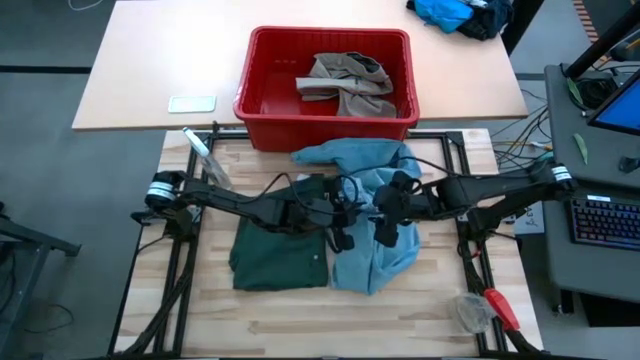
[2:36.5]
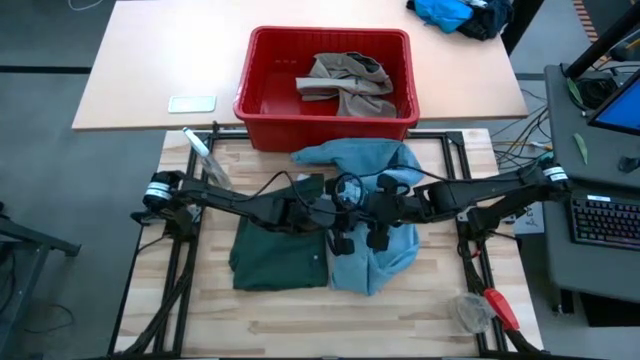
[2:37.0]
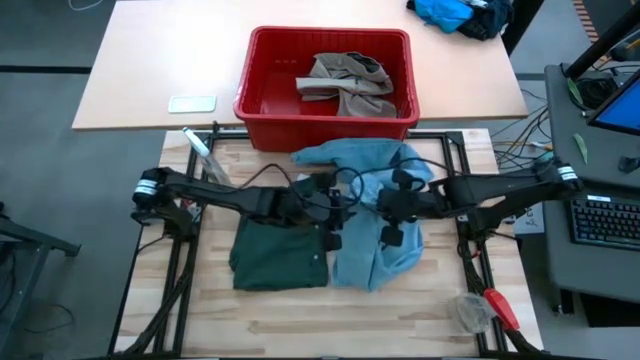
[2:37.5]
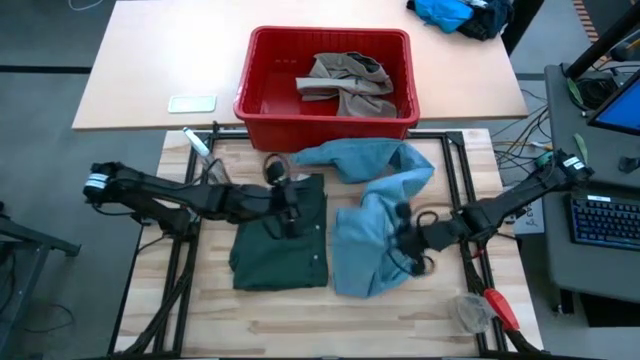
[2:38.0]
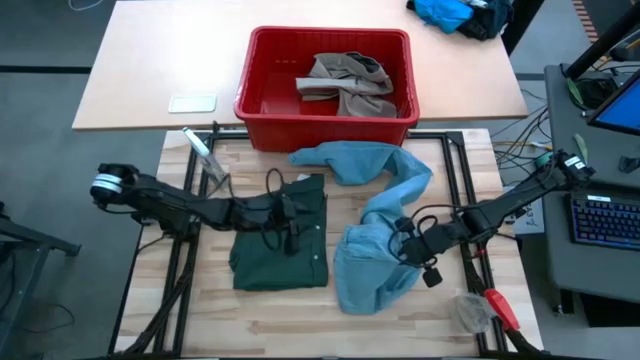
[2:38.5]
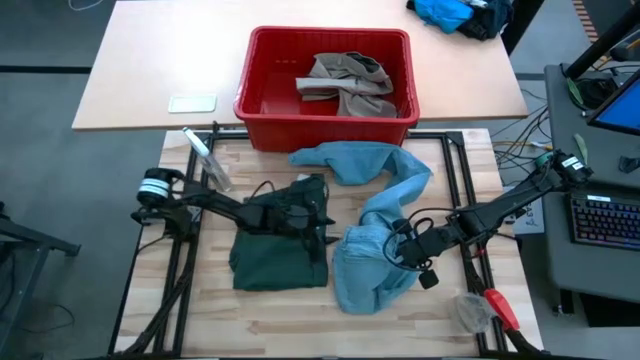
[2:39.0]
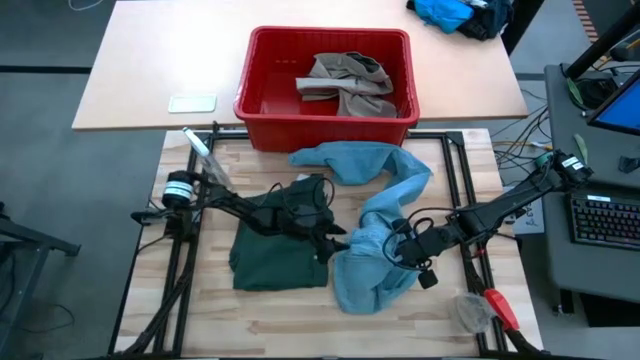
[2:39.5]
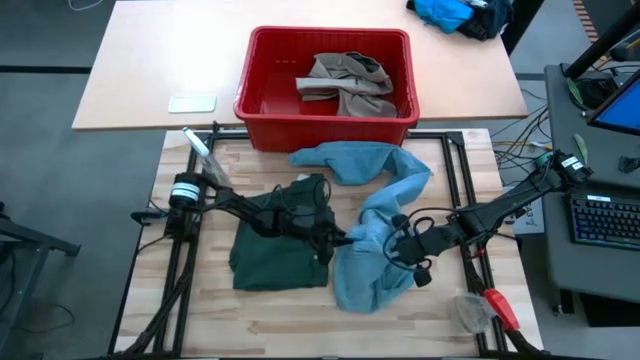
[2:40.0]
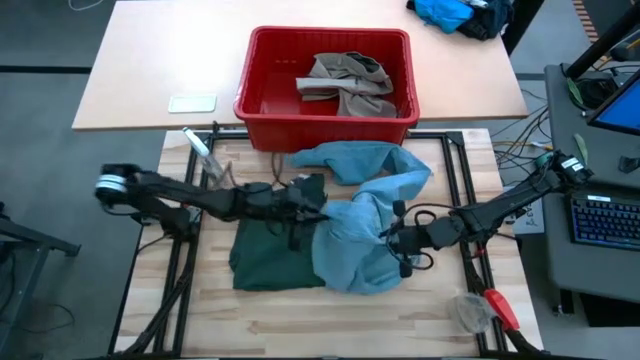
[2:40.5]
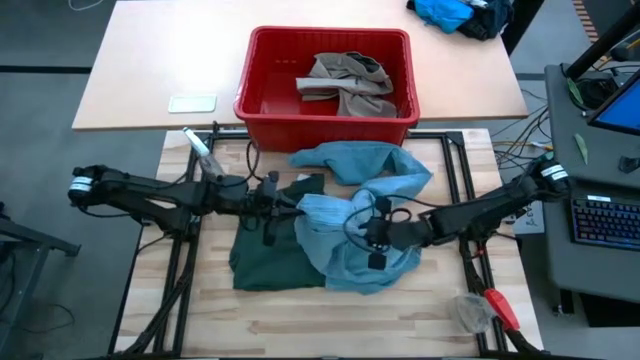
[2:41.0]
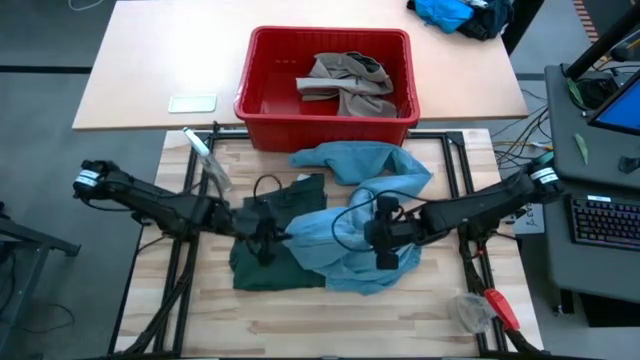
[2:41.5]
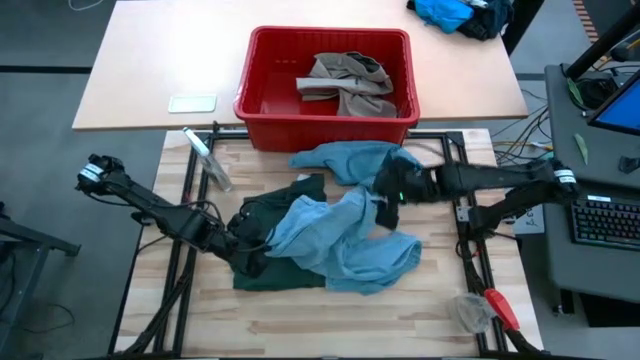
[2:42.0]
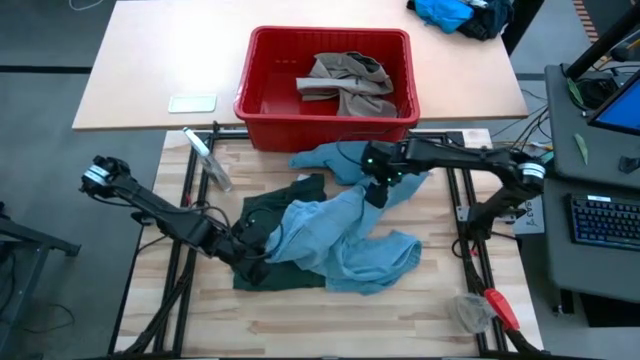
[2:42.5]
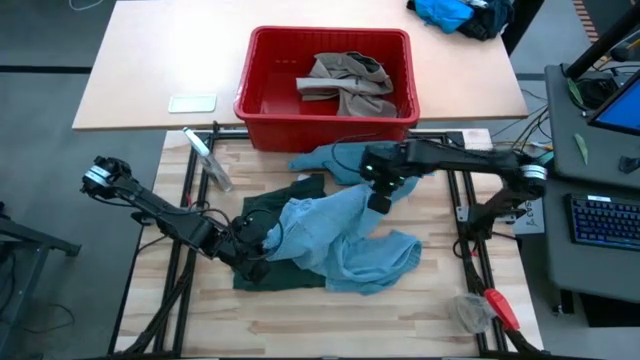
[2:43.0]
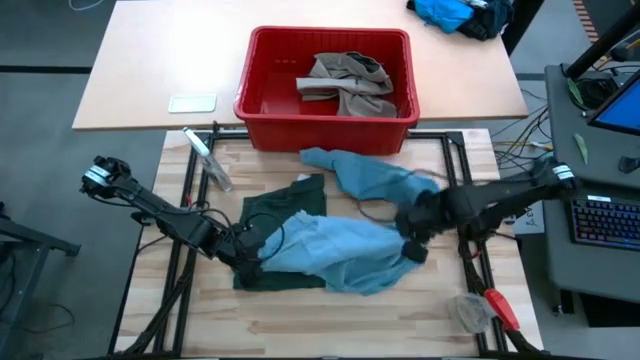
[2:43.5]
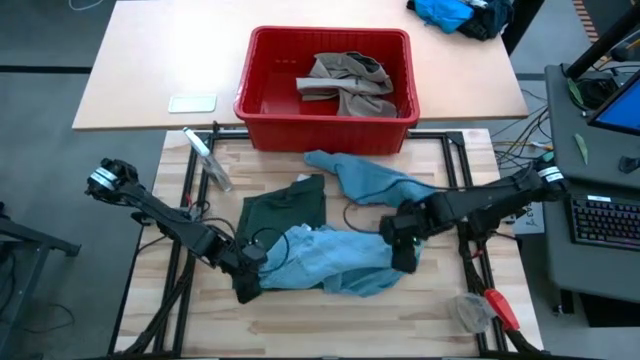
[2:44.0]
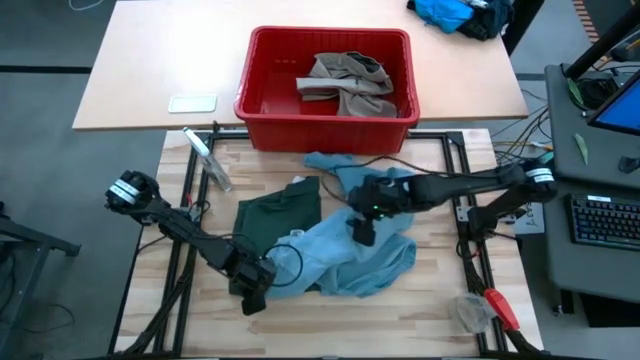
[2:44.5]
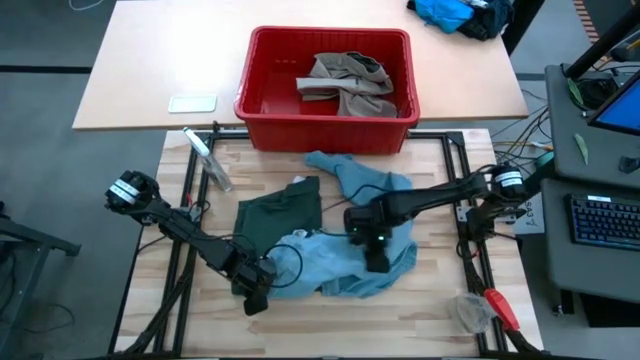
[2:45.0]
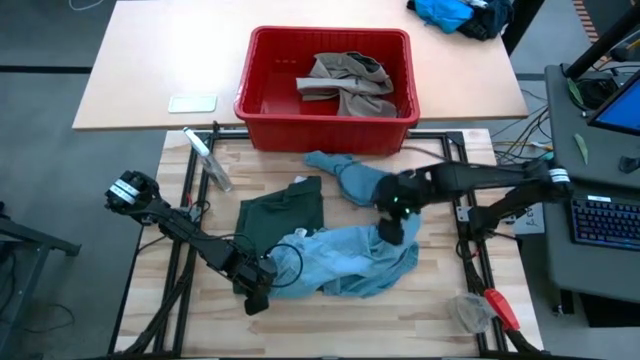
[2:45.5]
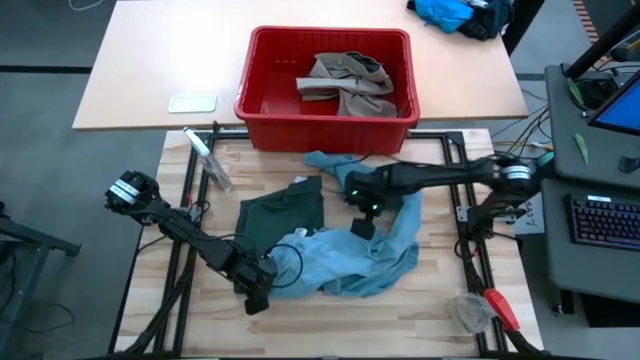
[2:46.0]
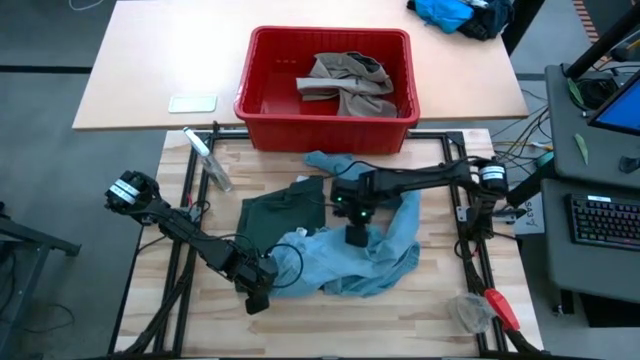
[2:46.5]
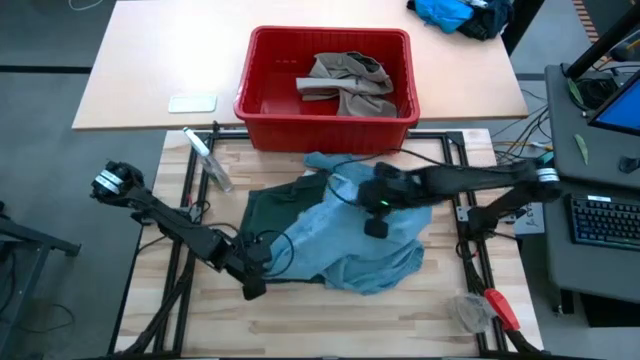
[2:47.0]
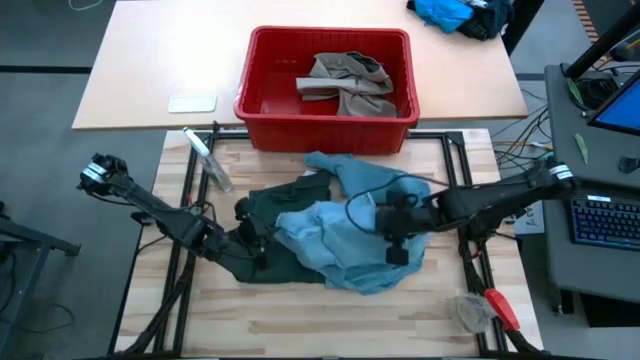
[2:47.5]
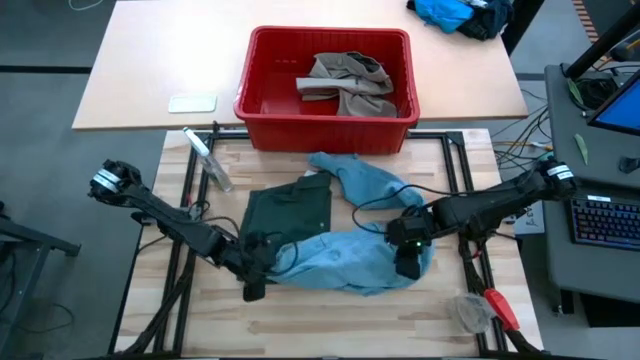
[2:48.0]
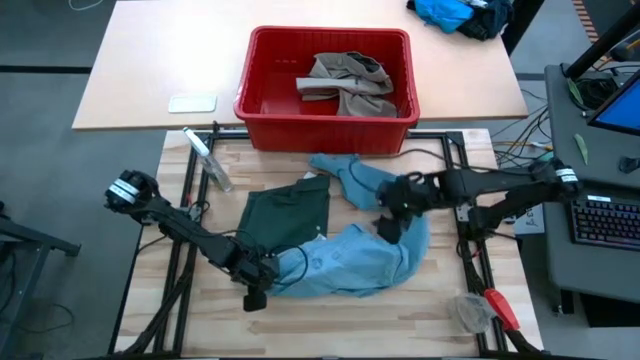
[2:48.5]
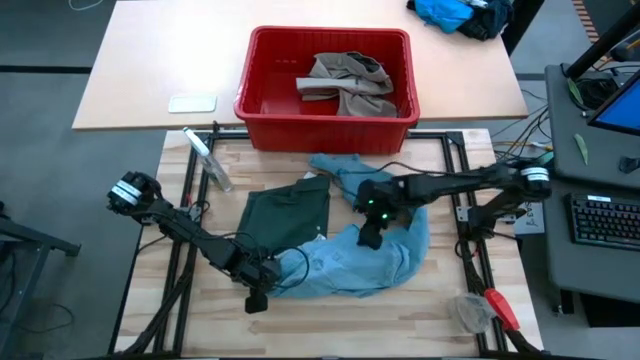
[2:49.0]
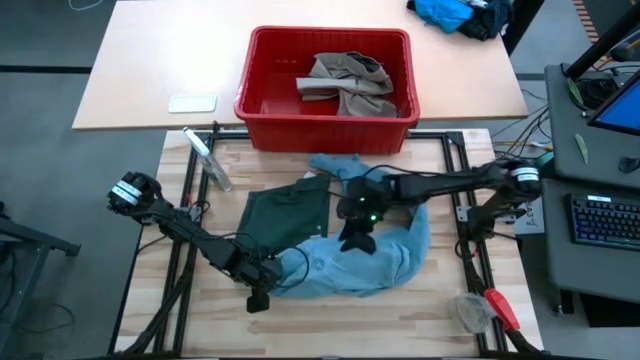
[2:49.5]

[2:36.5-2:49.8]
Task: Fold Laundry from Bin
Fold the blue jeans

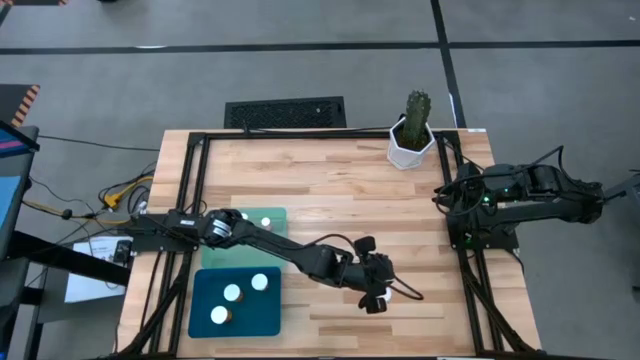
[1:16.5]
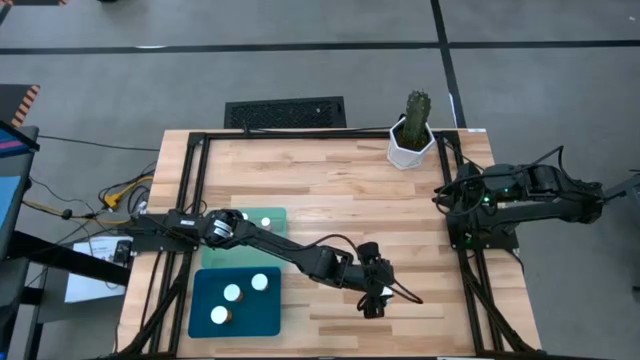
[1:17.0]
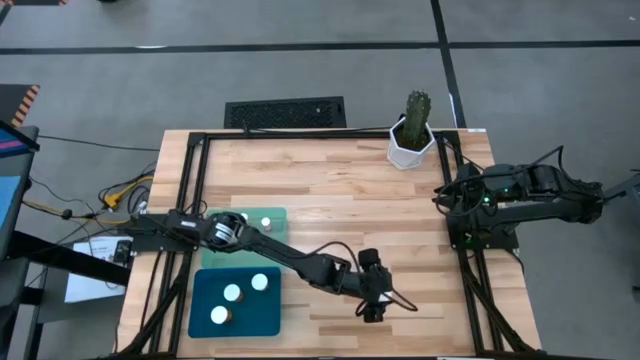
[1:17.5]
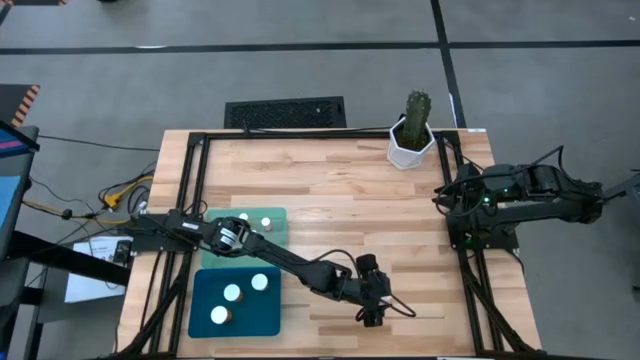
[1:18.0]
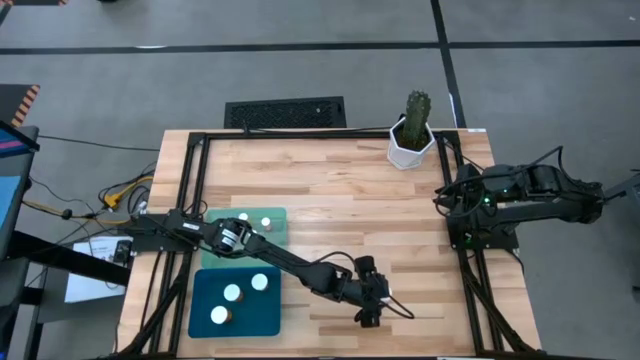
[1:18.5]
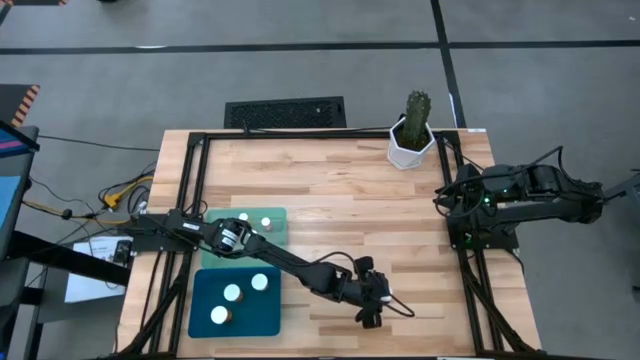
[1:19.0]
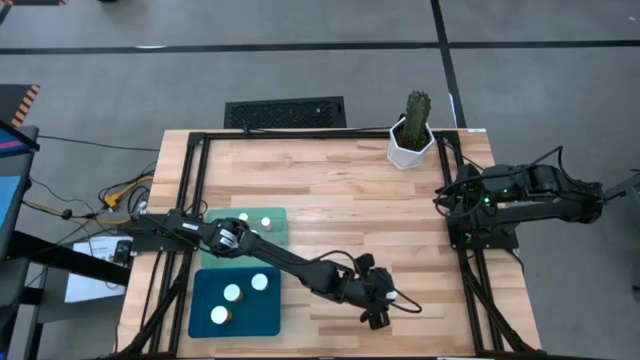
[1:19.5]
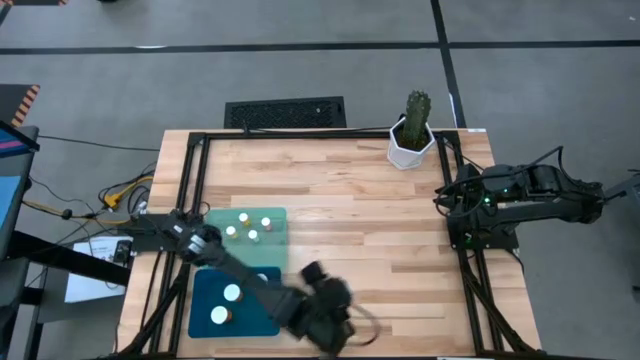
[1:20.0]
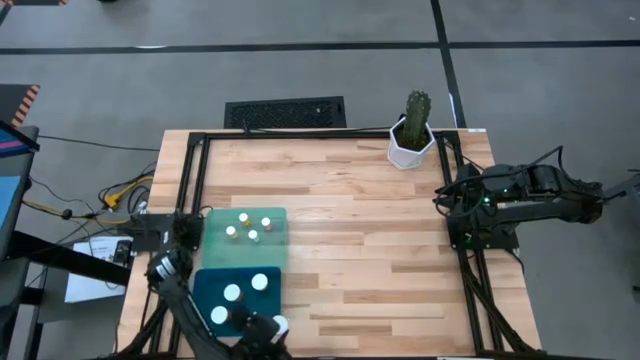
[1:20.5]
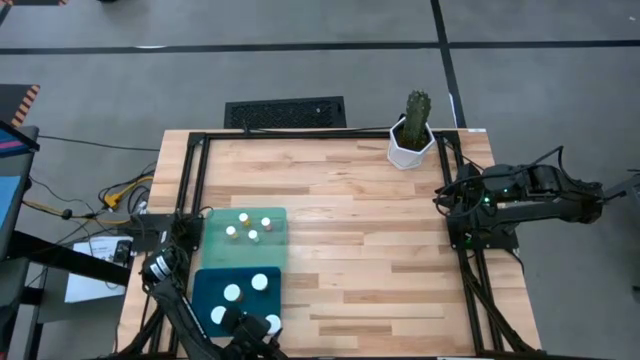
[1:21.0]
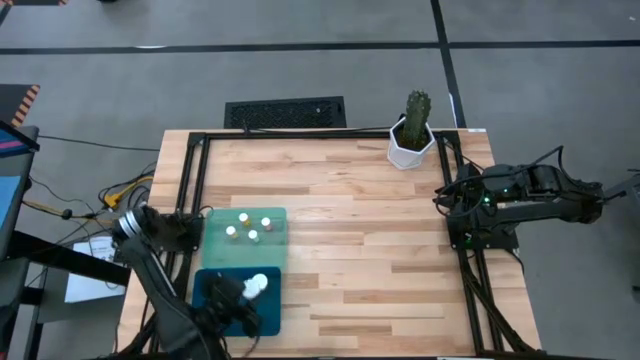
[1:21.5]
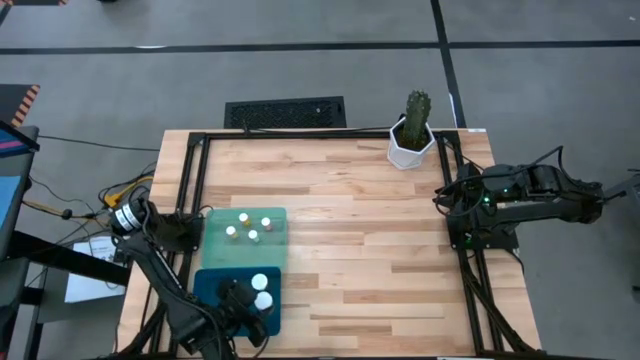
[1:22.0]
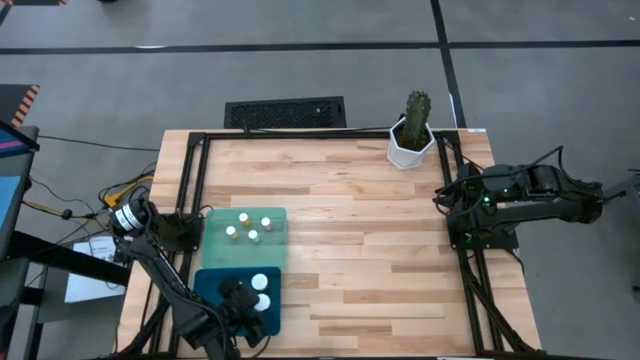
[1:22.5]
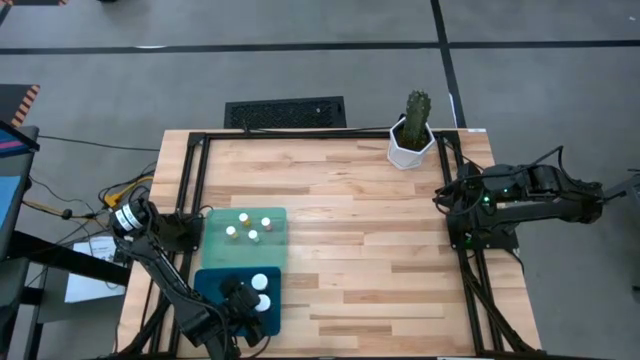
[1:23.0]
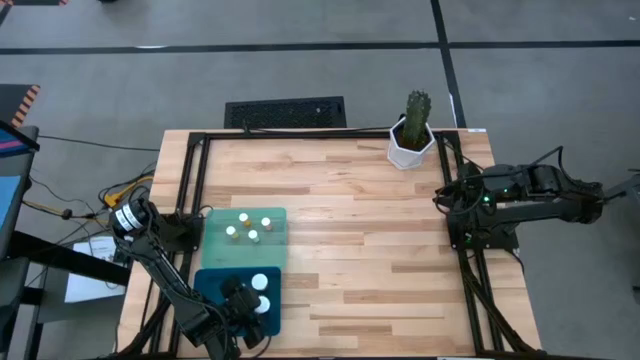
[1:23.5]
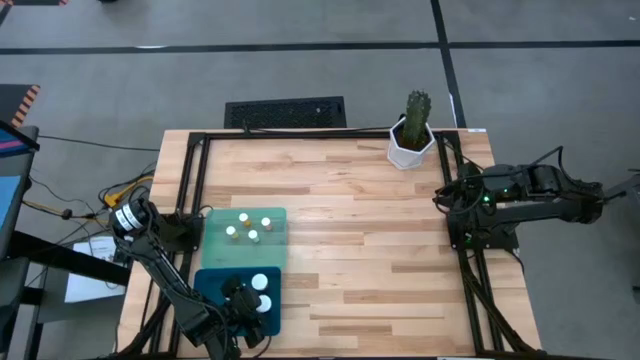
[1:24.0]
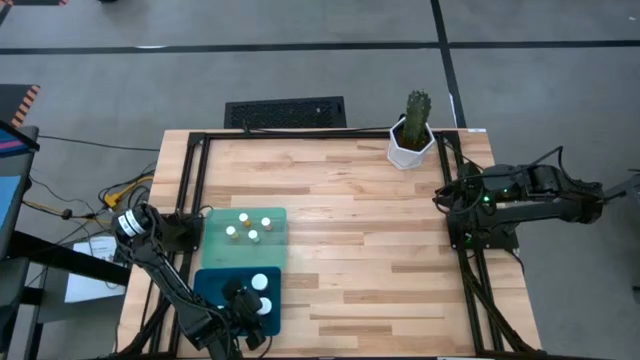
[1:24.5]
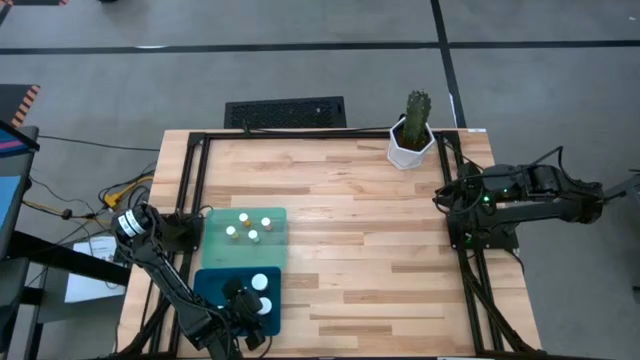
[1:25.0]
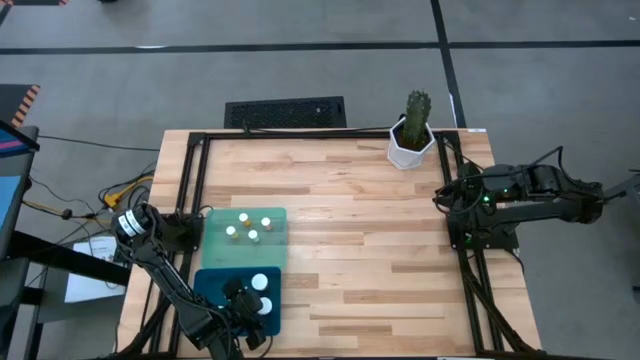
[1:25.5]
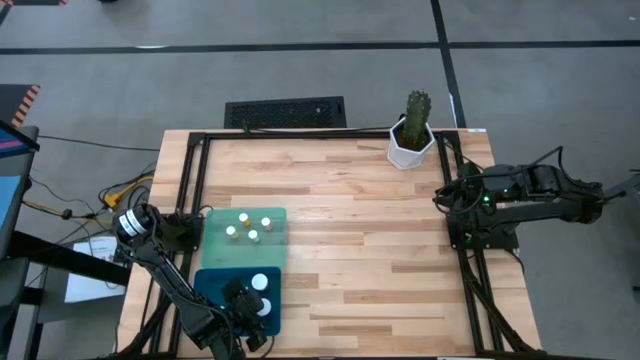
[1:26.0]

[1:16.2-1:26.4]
Task: Pick and place medicine bottles into bin by pill shape (circle, oval)
Put the big orange pill bottle into the blue bin
